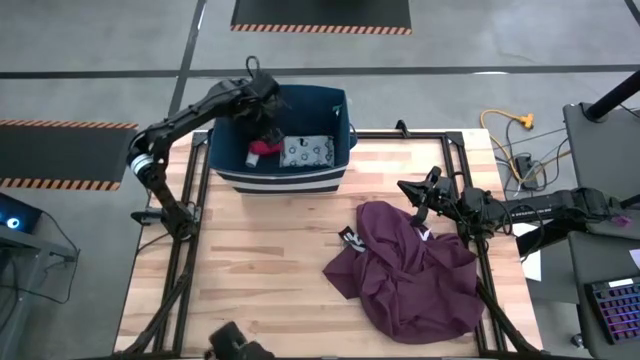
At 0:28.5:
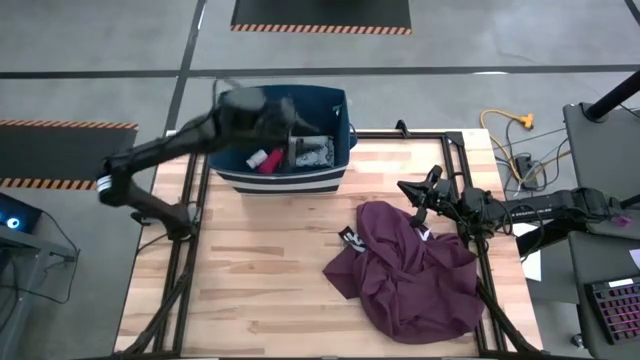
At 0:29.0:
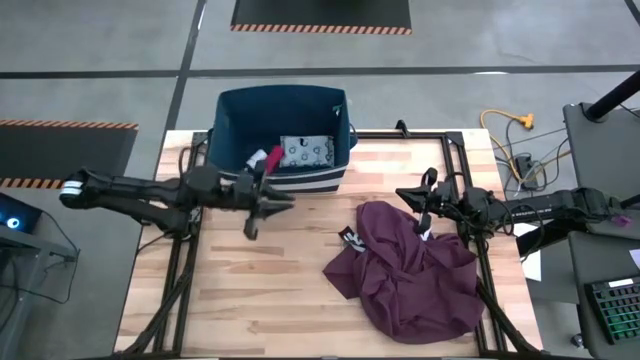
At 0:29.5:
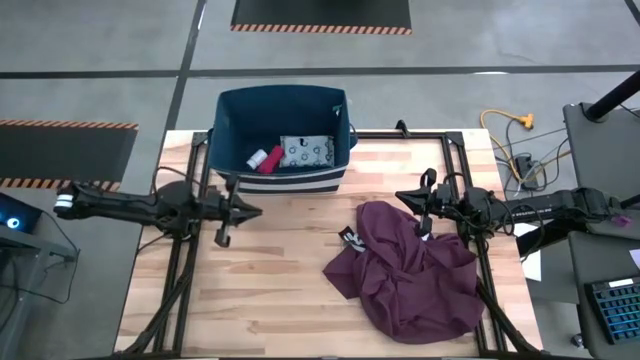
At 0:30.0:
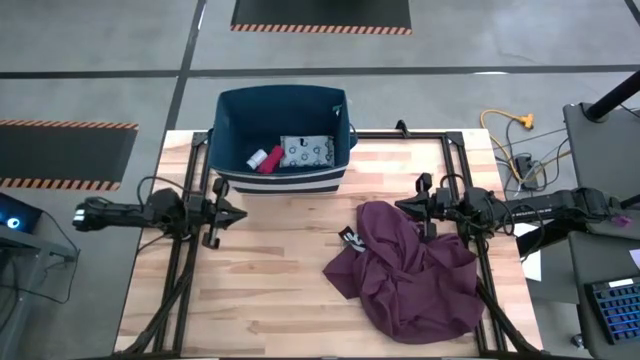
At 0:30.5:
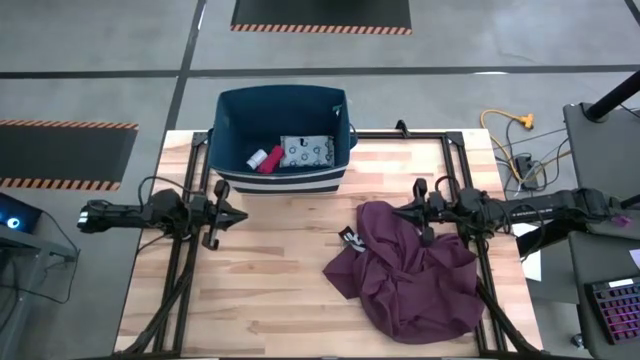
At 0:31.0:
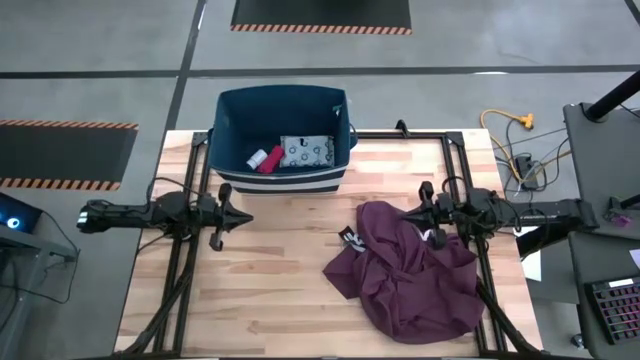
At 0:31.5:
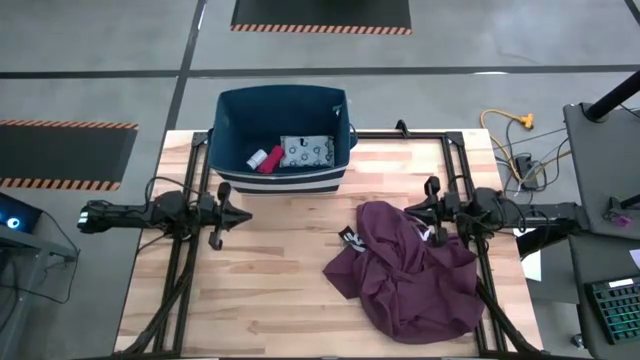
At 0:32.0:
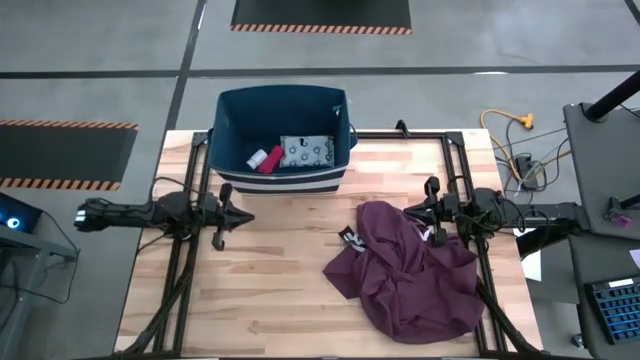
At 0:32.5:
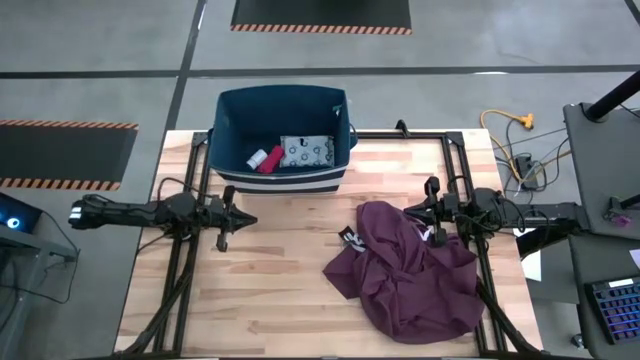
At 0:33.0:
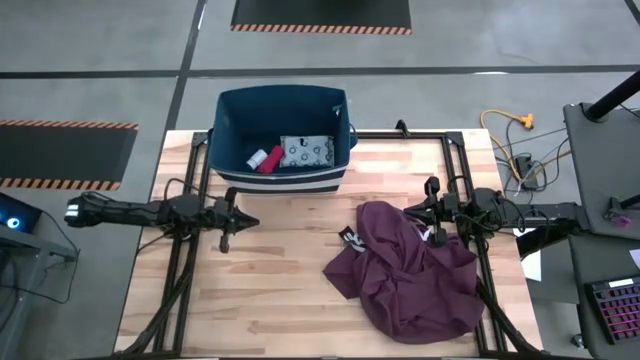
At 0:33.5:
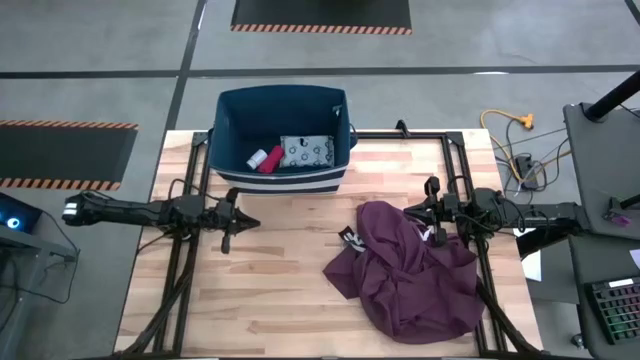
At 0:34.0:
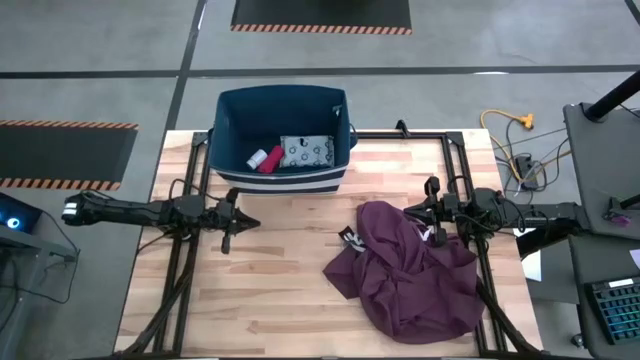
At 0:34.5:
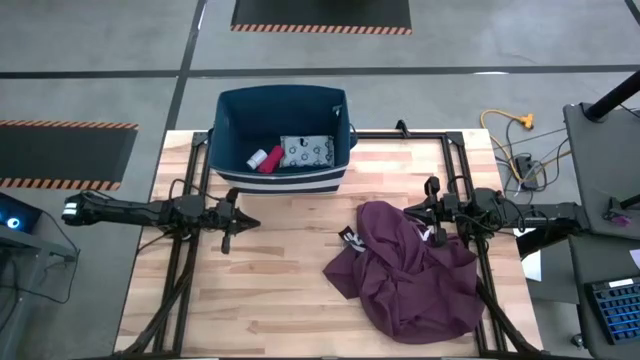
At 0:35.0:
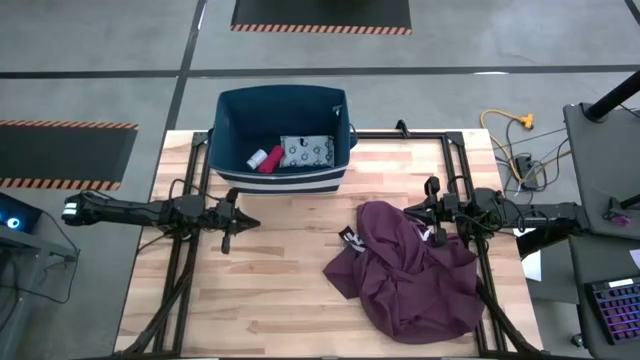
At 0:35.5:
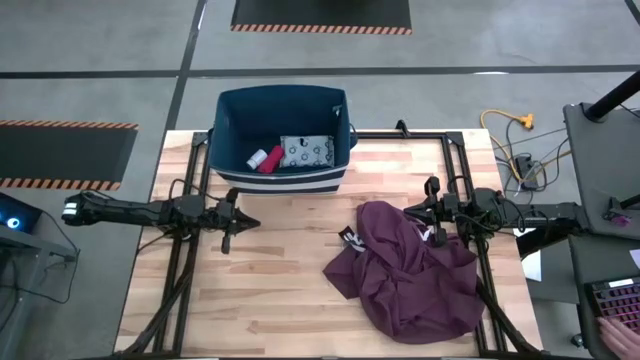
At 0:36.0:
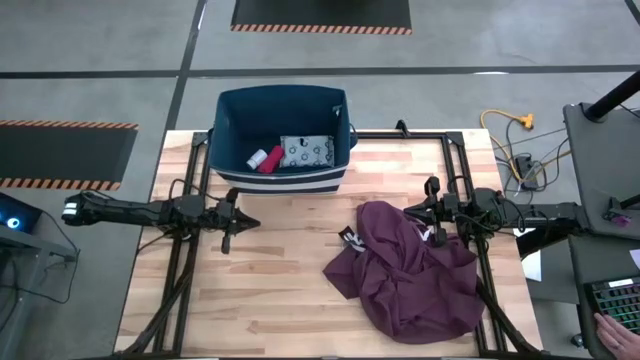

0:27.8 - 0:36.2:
Task: Pick & place medical supplies in basket/bin
Return to Home Position

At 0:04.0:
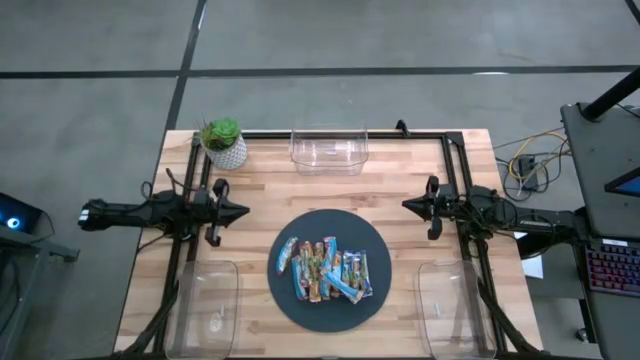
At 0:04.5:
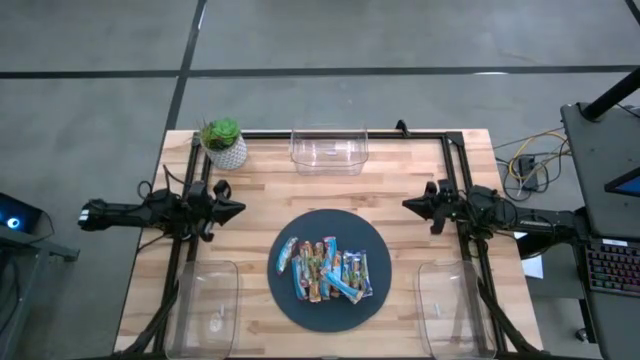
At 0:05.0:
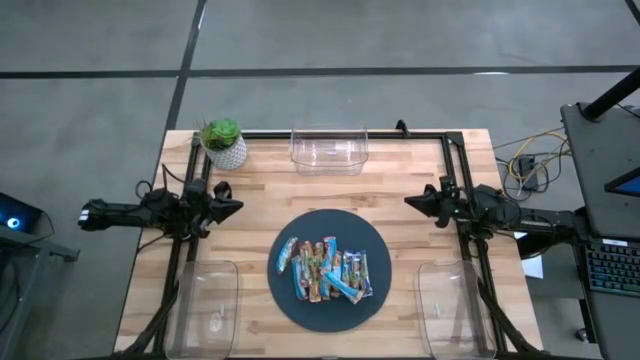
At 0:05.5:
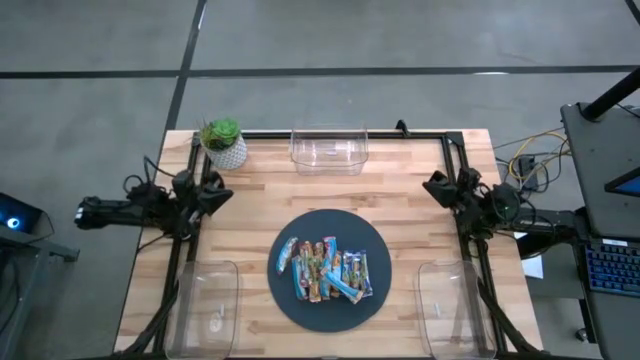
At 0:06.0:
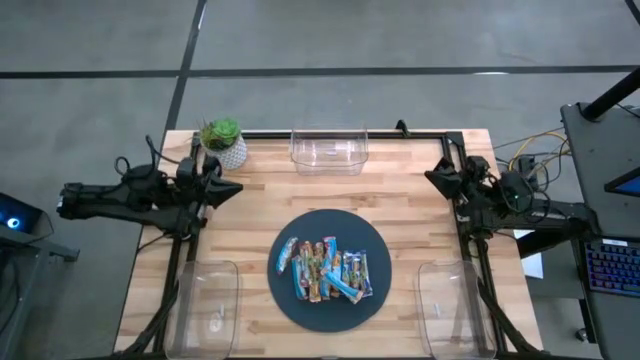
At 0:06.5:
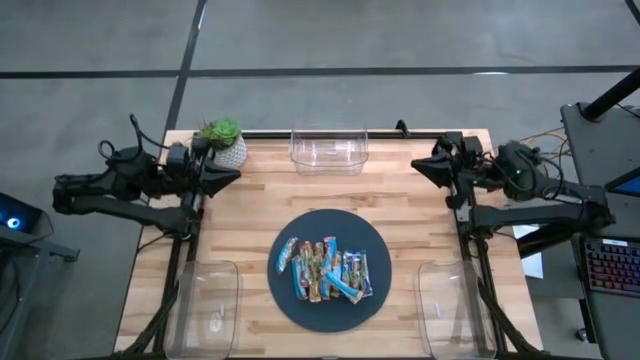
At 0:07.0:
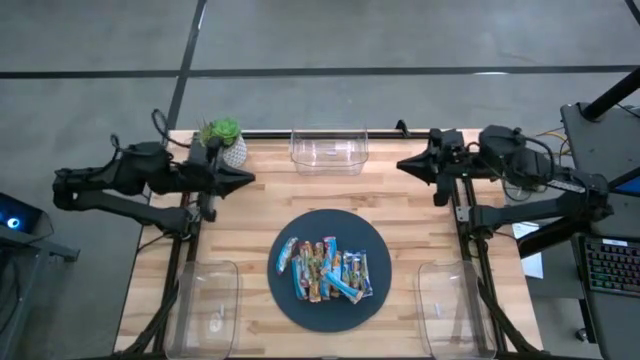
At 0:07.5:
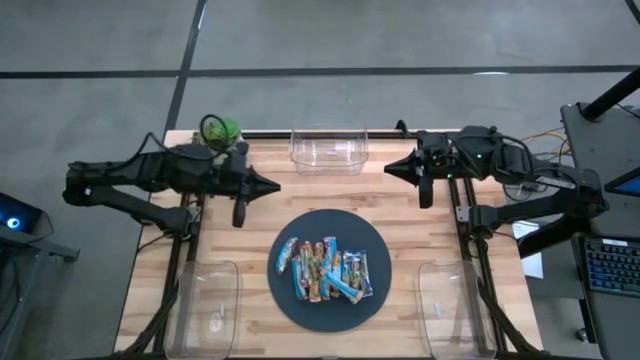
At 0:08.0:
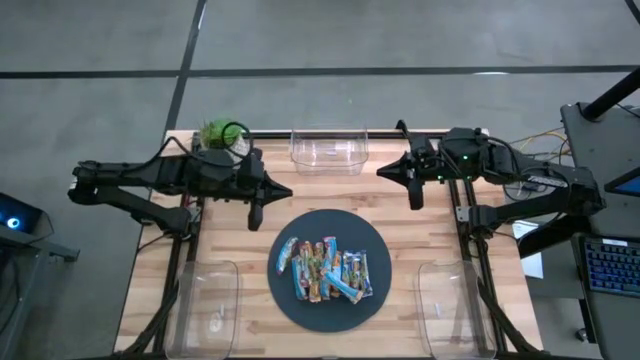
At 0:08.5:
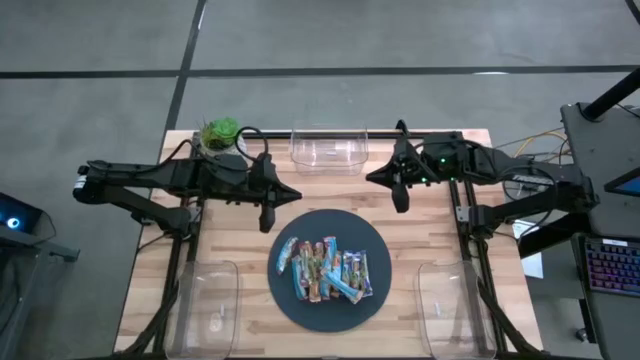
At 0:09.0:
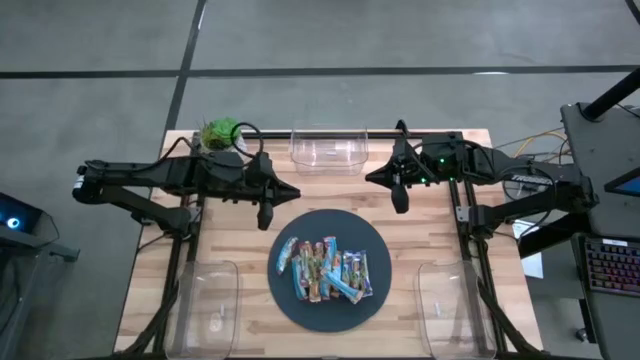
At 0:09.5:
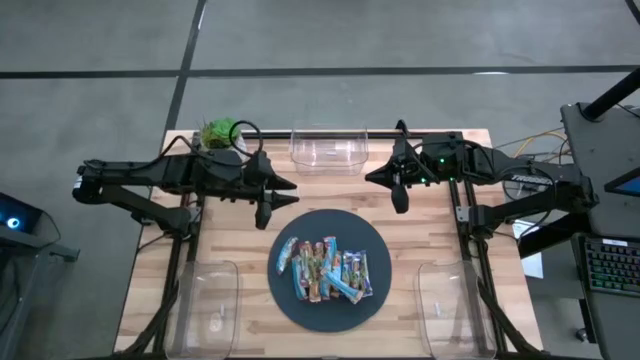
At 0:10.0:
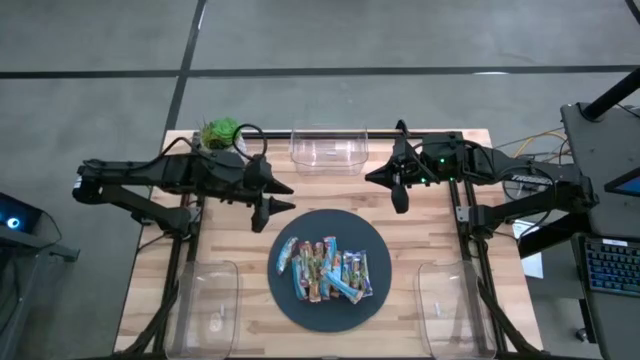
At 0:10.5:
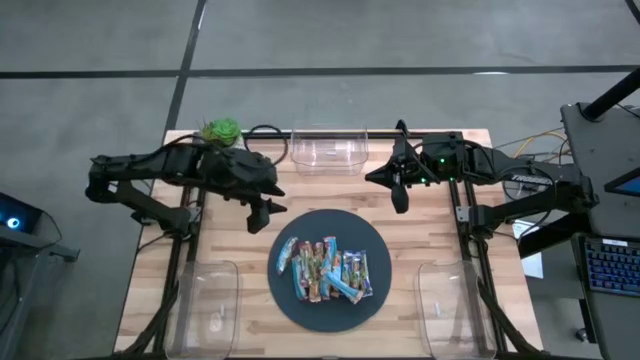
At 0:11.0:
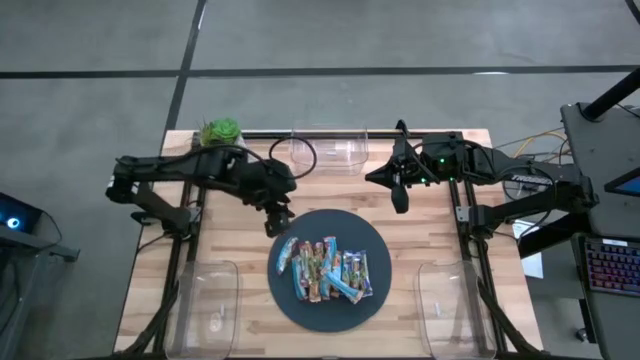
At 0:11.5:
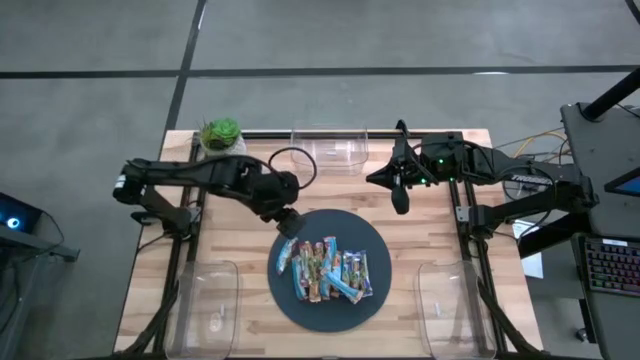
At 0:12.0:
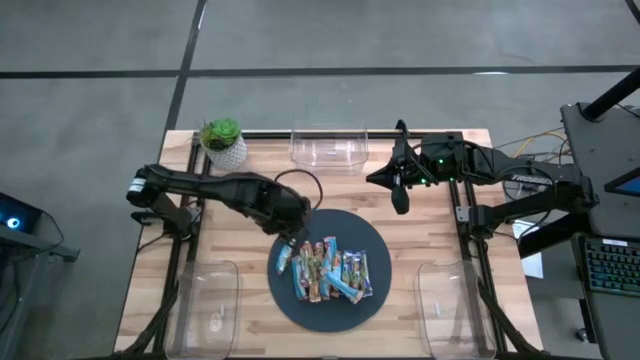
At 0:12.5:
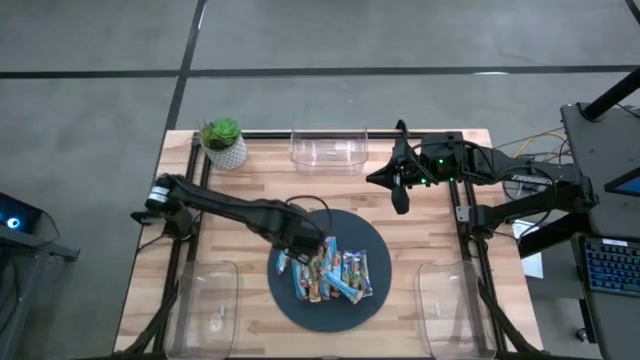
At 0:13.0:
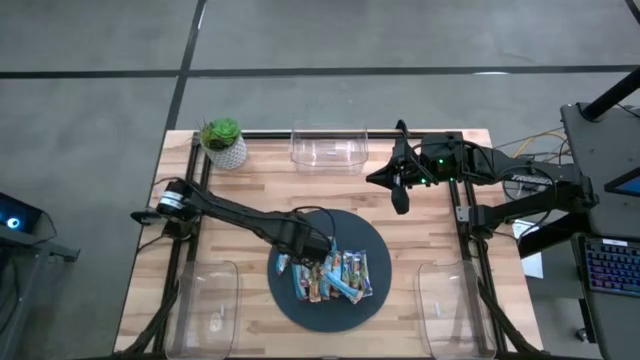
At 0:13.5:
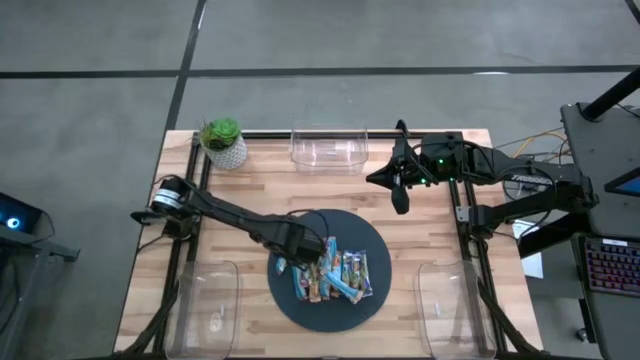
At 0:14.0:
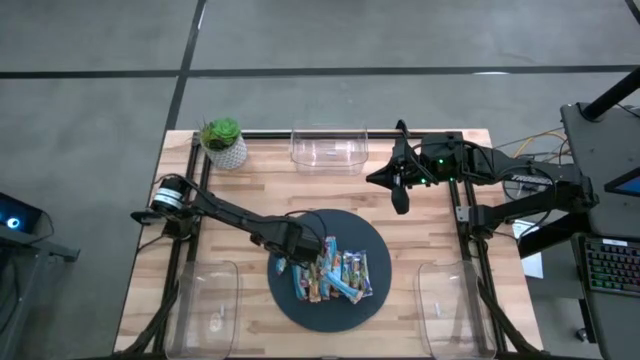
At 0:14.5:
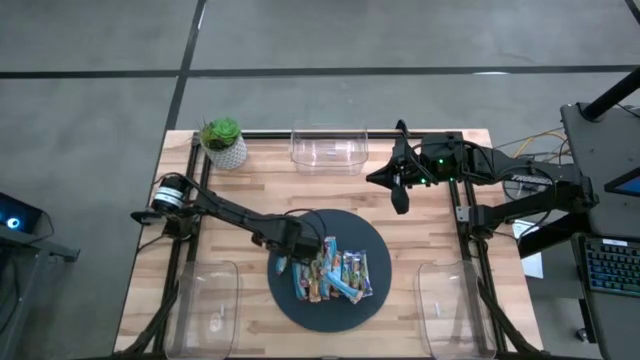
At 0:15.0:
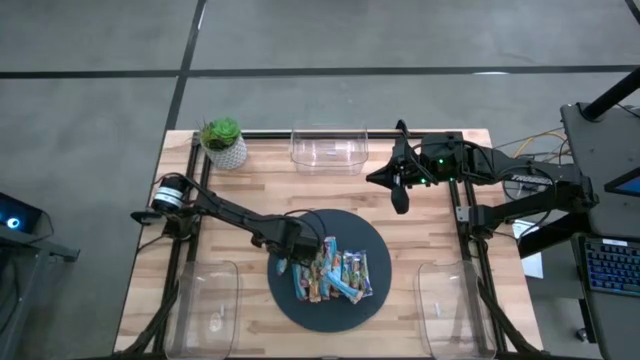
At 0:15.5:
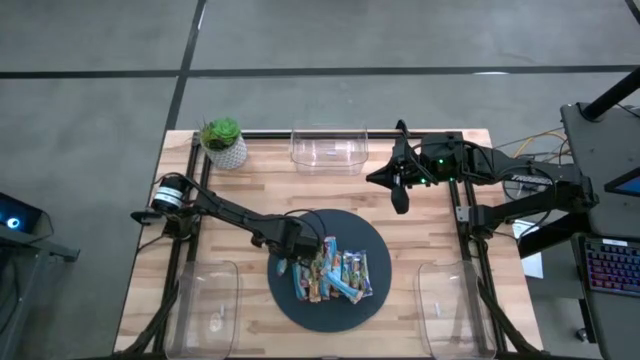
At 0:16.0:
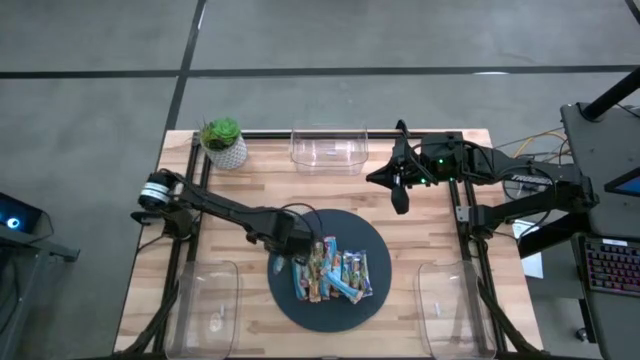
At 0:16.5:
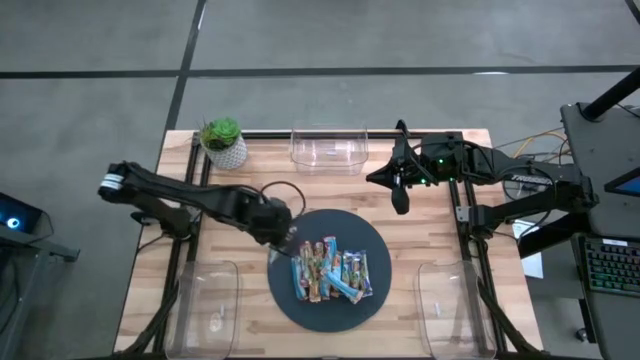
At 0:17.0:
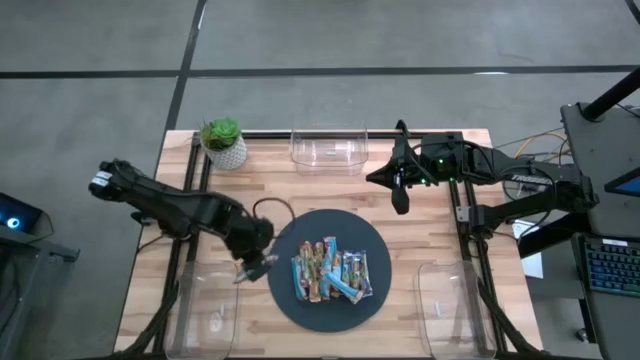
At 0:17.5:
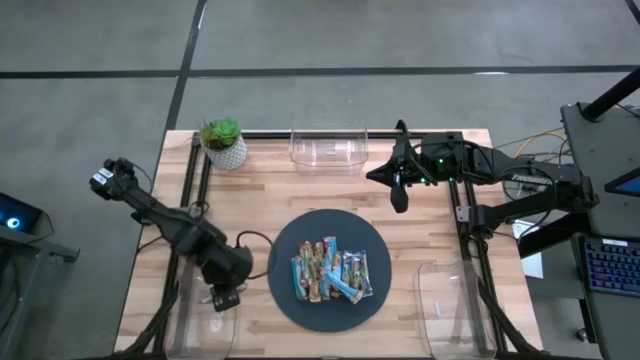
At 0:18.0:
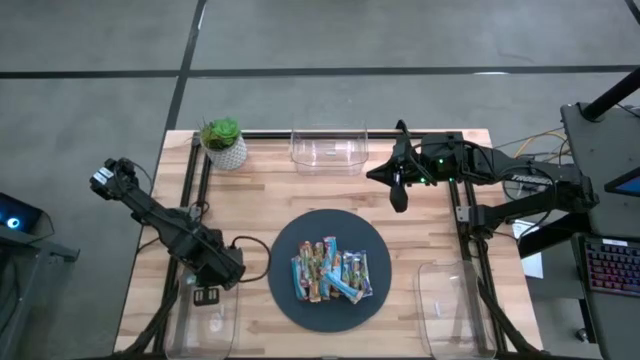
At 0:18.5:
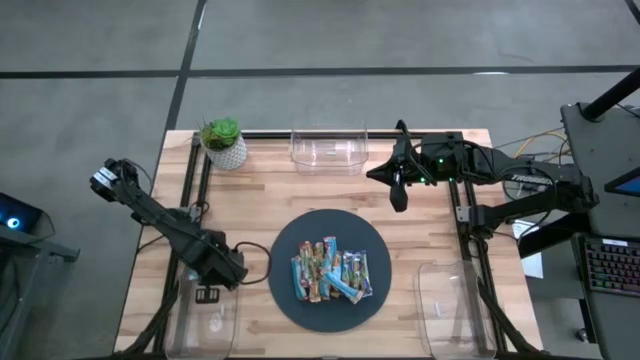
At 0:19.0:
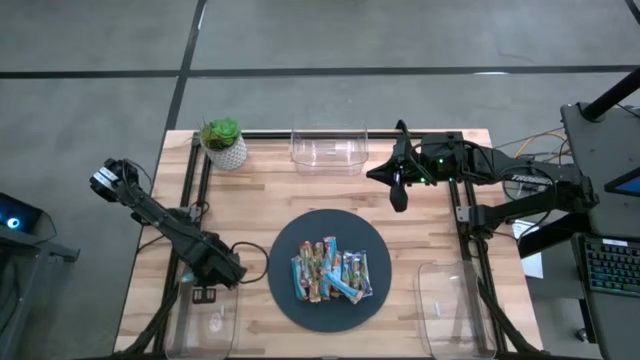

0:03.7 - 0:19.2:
Task: Pick and place Granola Bars by type
Put the red granola bar into the bottom left transparent bin
